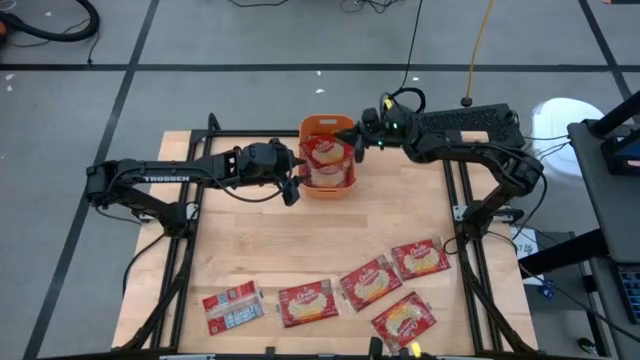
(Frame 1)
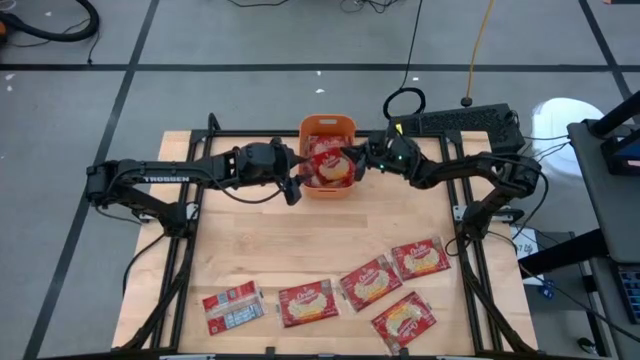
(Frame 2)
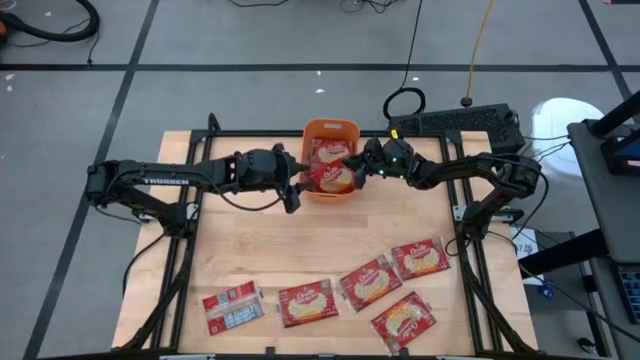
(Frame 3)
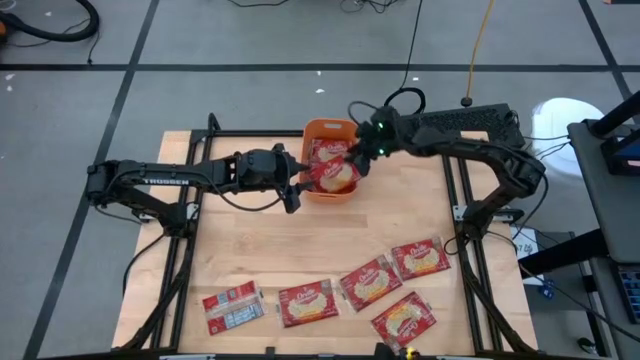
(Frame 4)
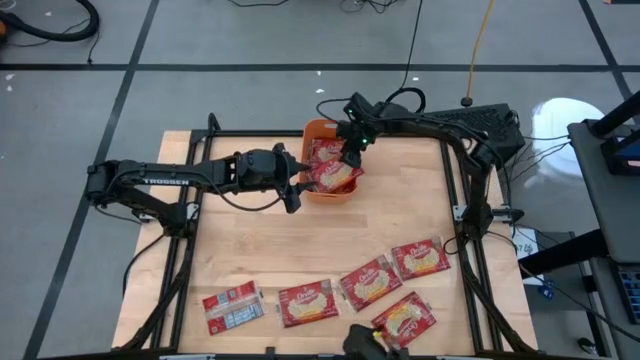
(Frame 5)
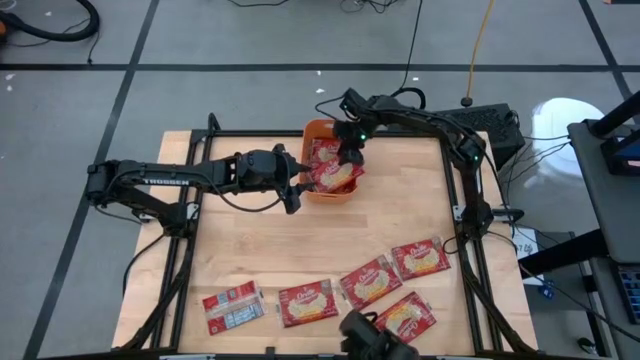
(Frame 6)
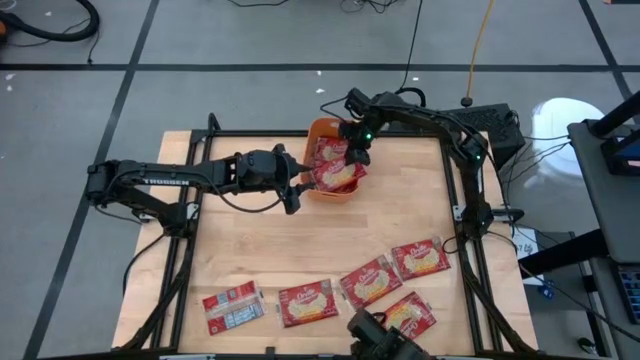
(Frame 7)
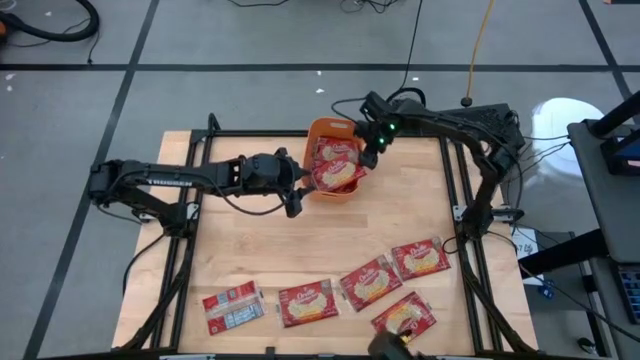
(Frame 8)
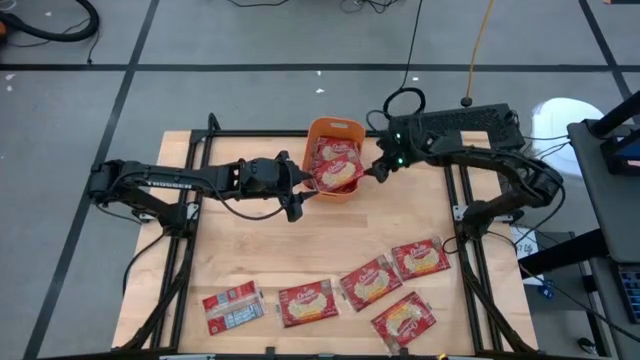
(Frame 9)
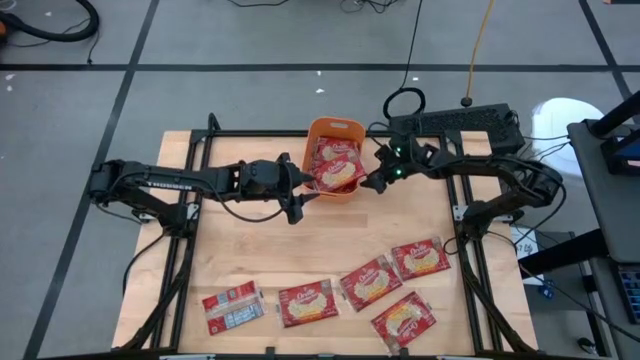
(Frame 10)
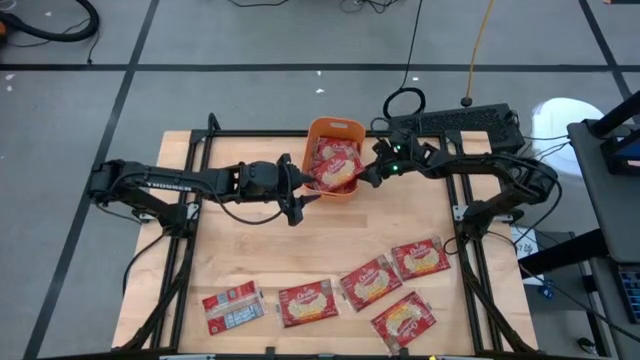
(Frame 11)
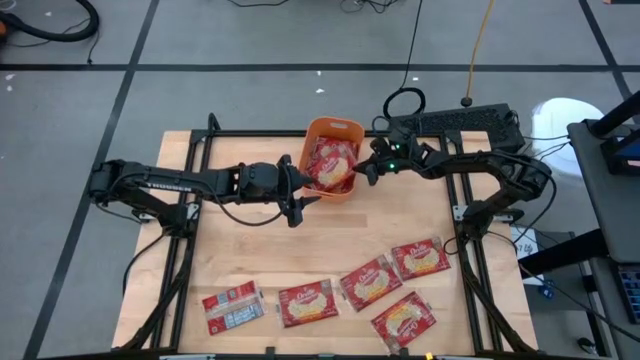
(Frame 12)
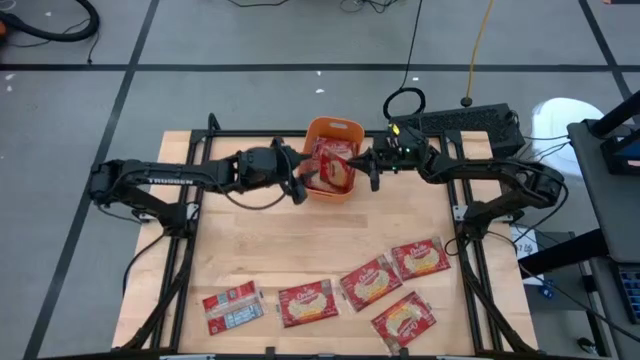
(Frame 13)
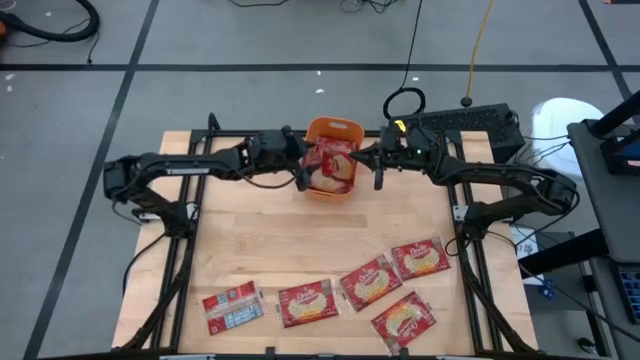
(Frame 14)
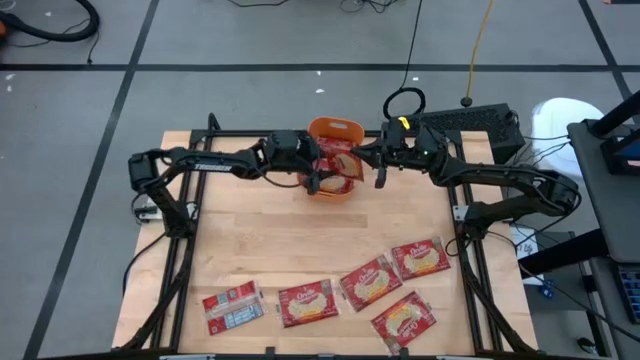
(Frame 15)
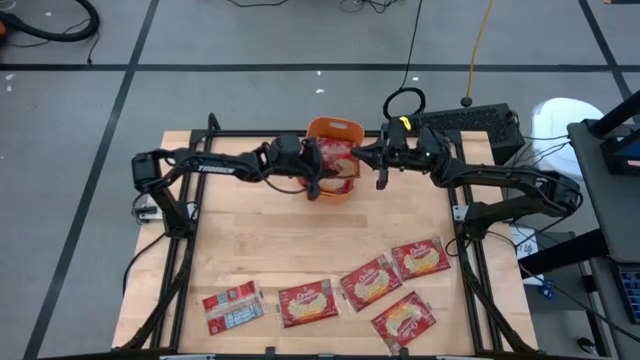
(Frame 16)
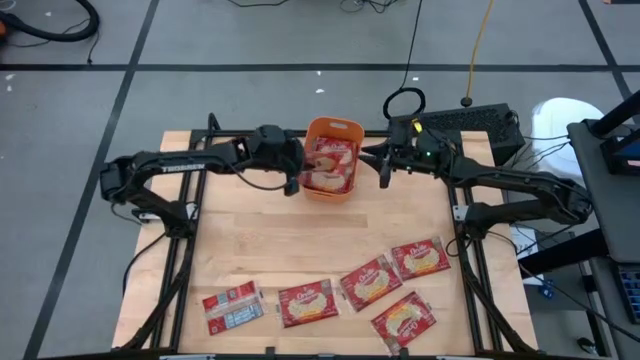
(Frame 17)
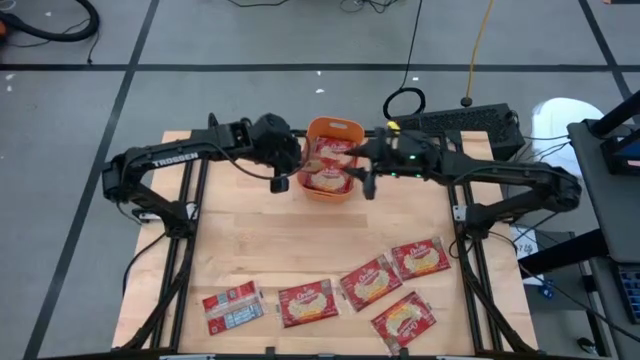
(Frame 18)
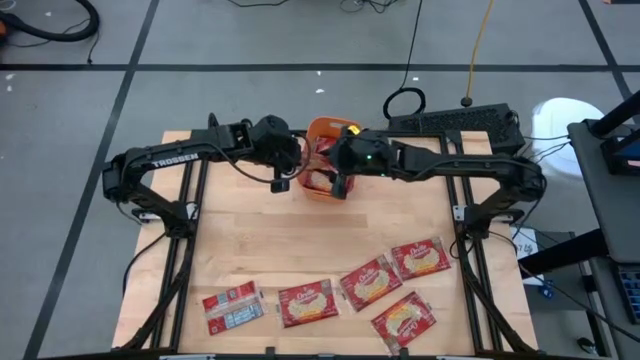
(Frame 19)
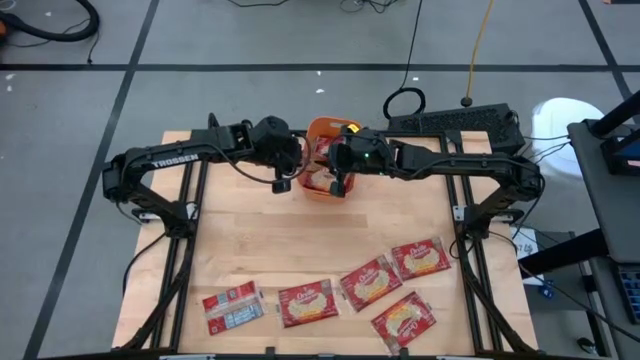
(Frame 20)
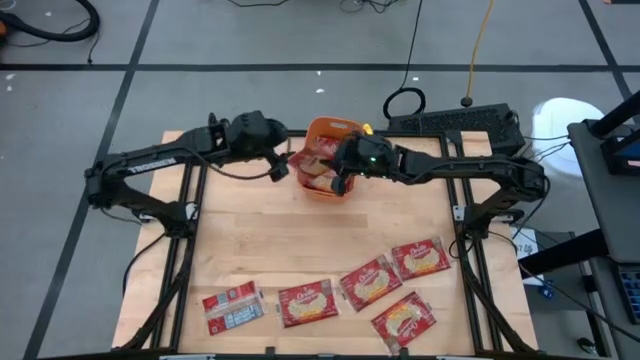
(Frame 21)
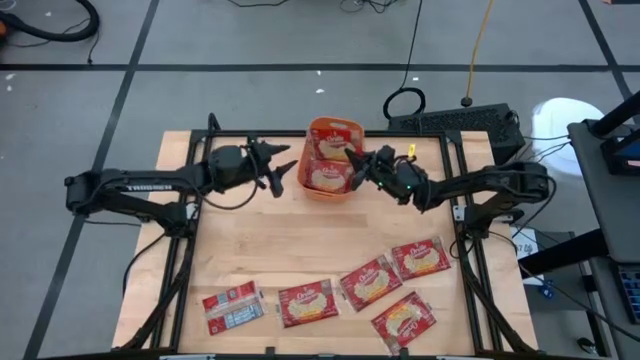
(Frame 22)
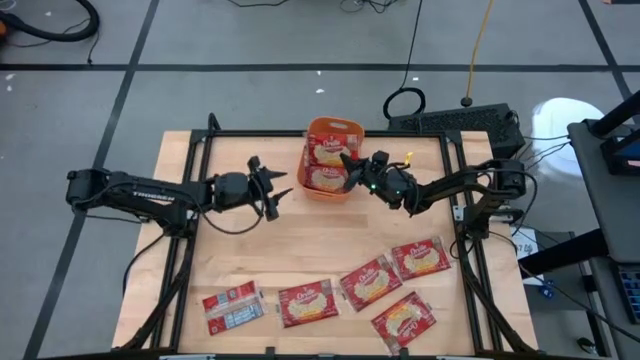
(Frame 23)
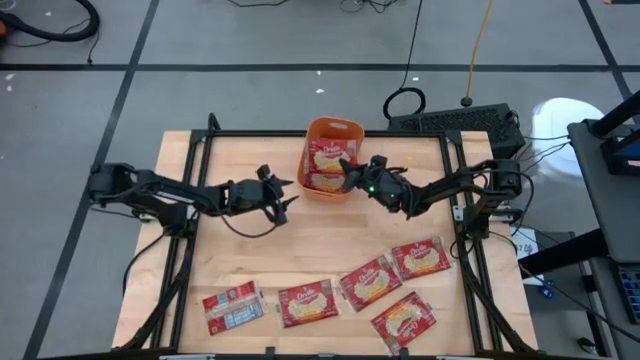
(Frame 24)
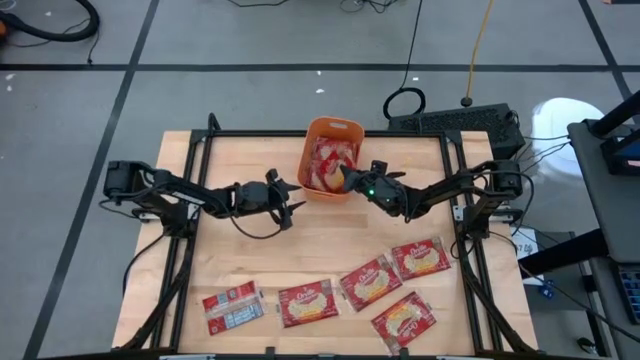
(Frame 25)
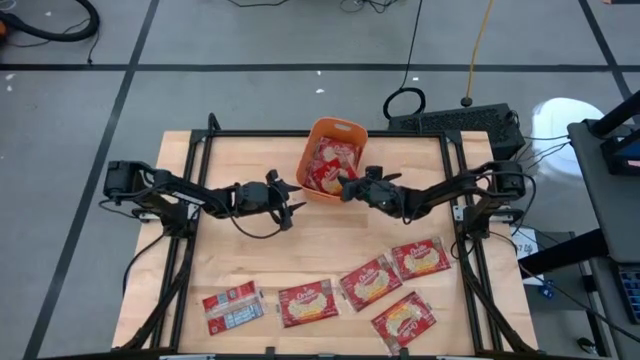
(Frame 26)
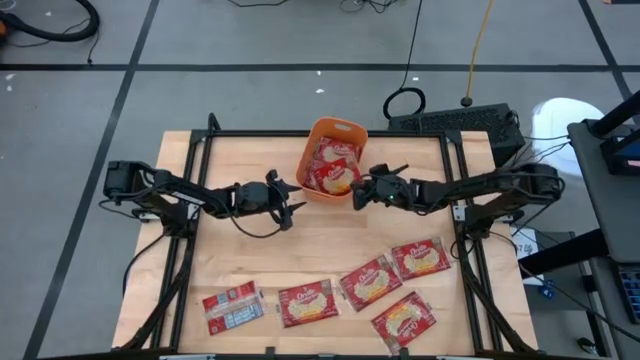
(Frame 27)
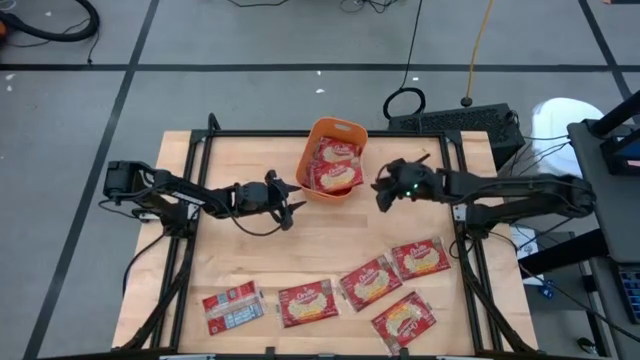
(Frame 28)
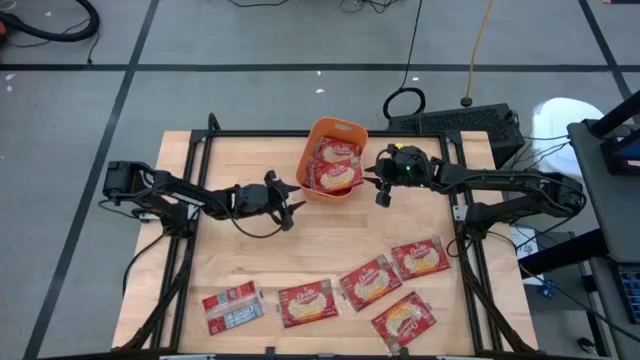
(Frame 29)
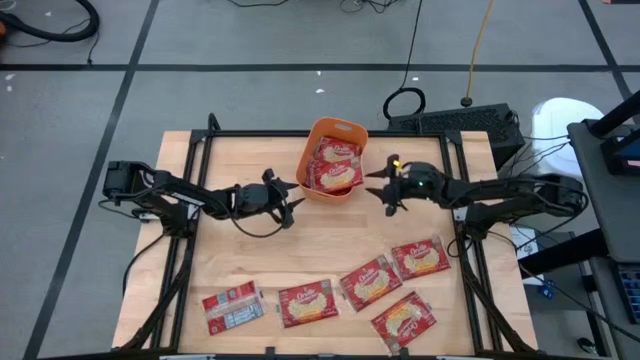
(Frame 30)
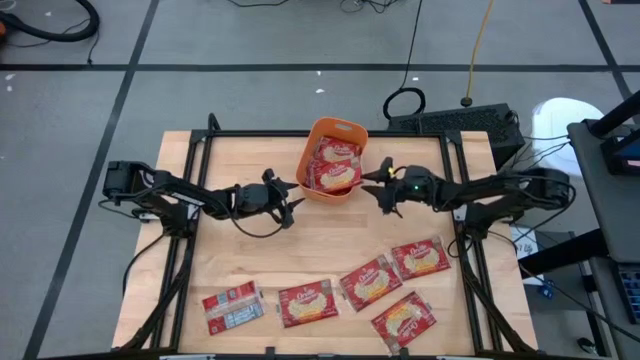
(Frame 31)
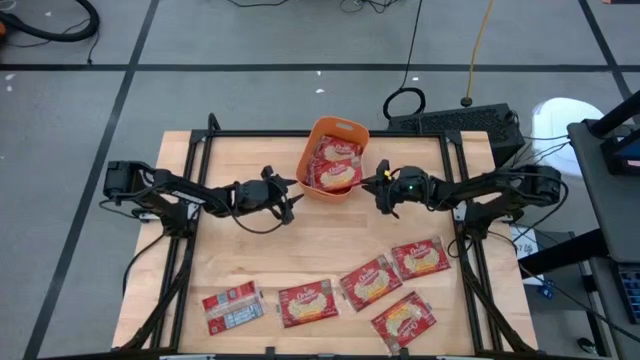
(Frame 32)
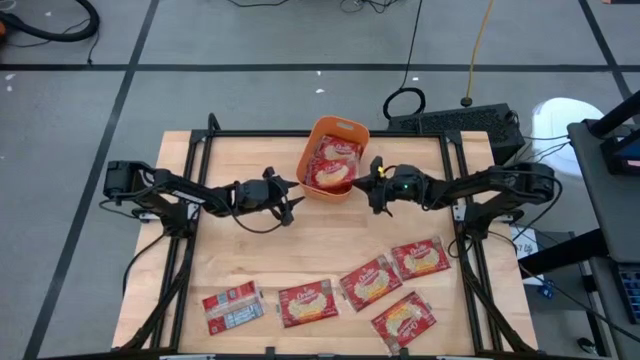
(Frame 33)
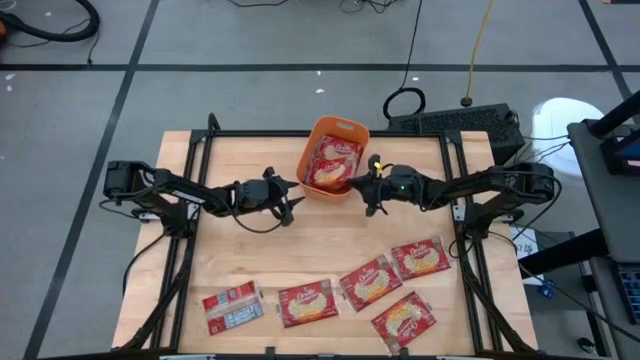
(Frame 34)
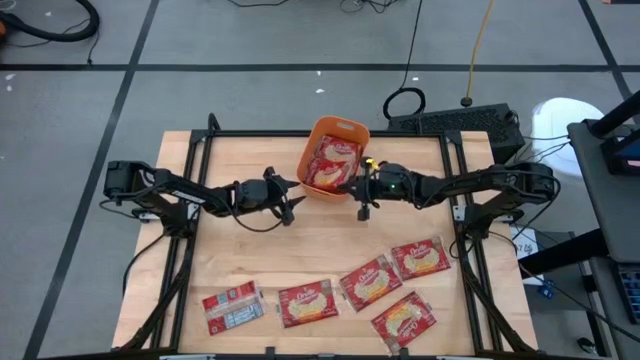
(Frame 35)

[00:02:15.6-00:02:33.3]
Task: Sort popcorn bags into baskets
Put the red popcorn bag into the orange bin

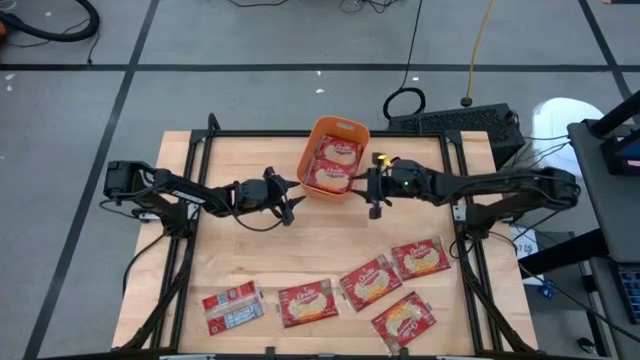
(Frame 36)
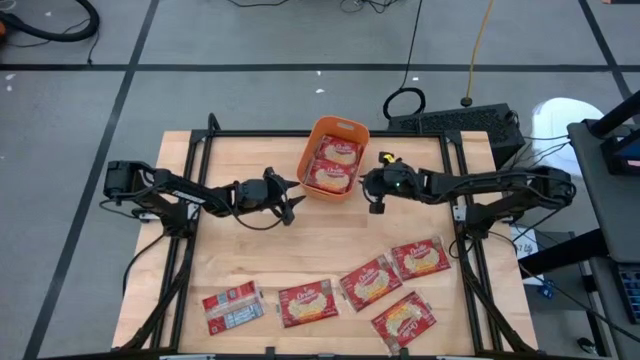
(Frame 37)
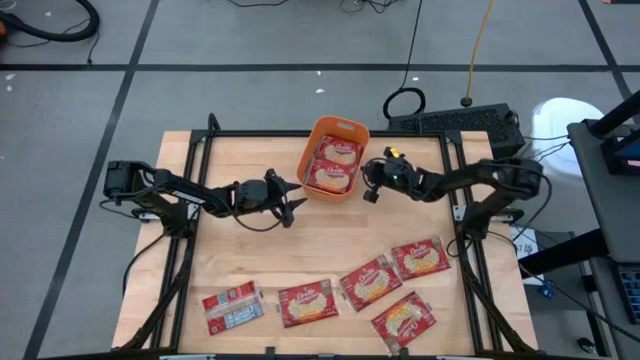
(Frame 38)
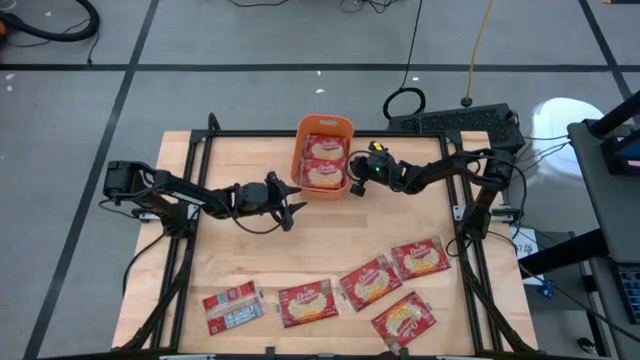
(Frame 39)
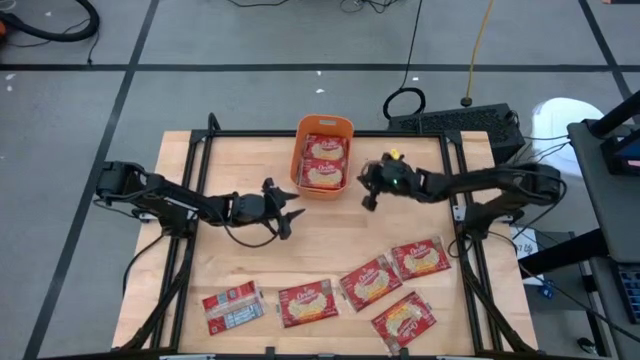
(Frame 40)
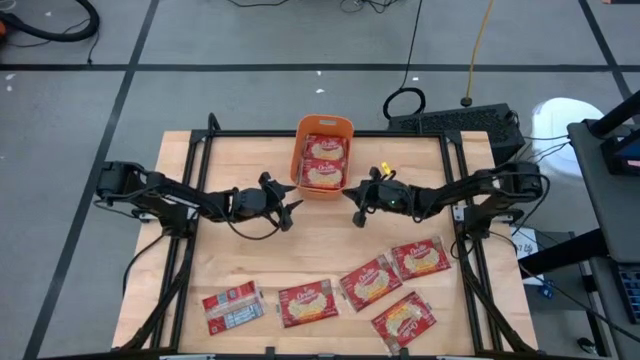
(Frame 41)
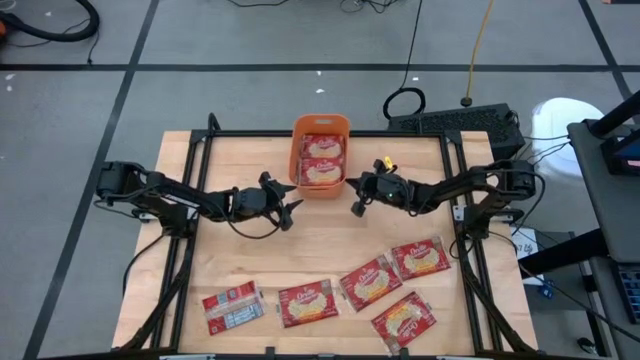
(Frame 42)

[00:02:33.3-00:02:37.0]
Adjust orange bin on the table

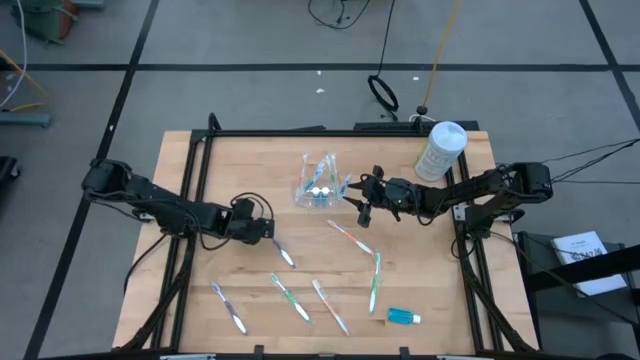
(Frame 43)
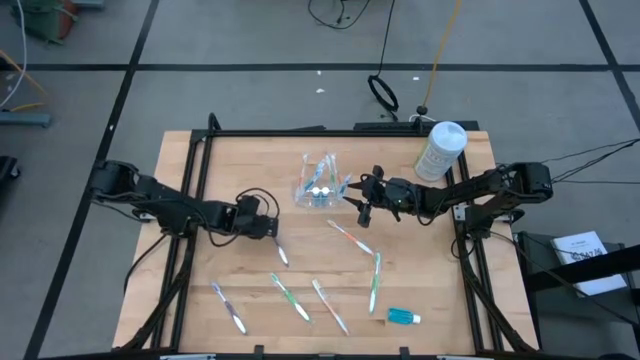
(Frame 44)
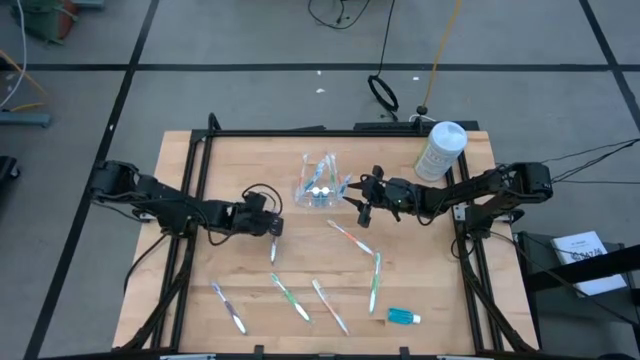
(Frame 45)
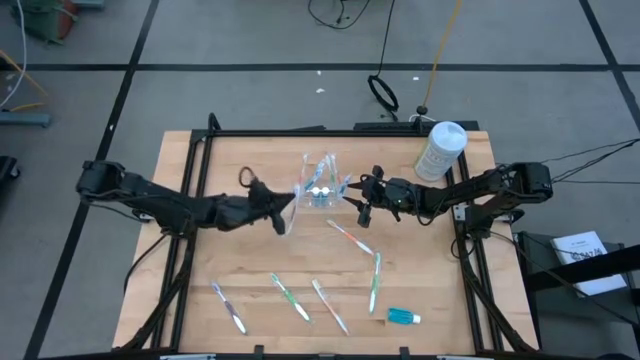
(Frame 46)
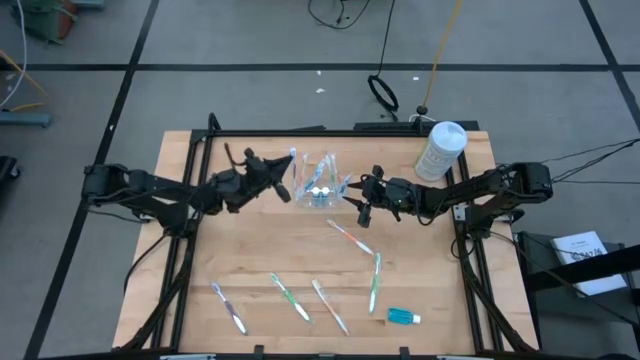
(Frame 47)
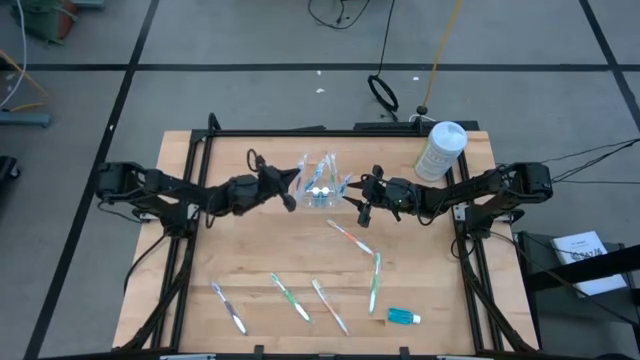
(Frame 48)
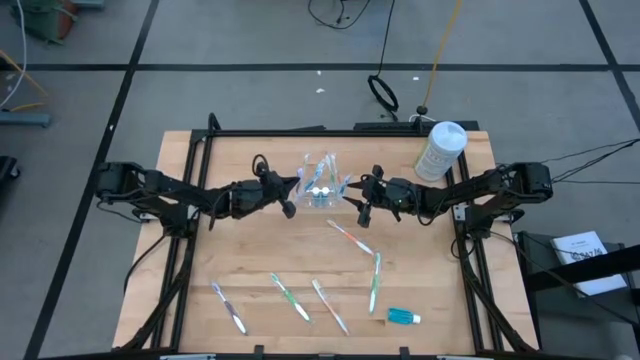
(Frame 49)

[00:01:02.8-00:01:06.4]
Task: Pick & Place Toothbrushes
Put the purple toothbrush into the transparent organizer
